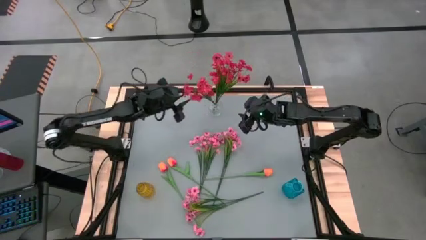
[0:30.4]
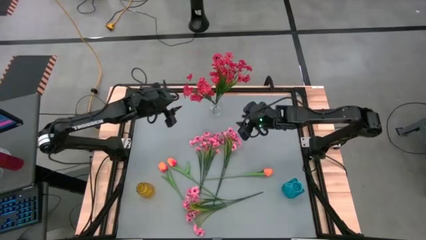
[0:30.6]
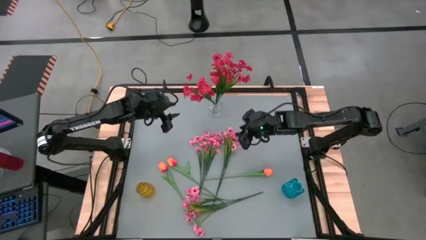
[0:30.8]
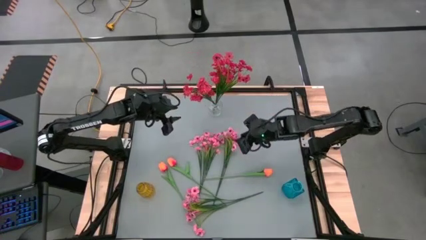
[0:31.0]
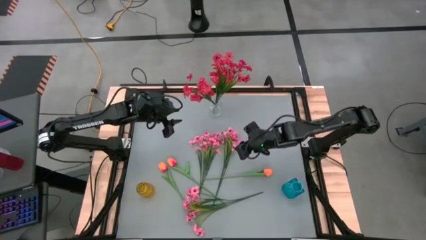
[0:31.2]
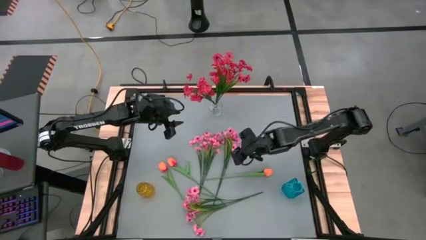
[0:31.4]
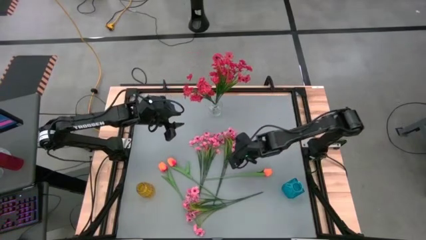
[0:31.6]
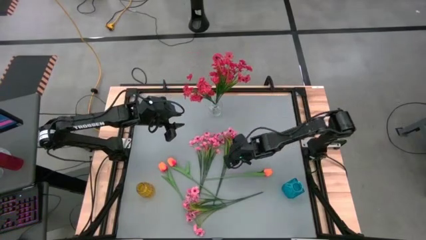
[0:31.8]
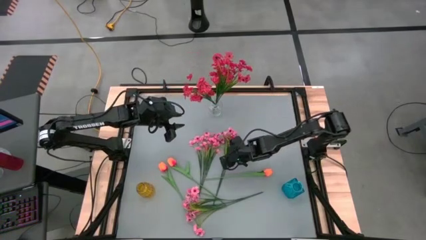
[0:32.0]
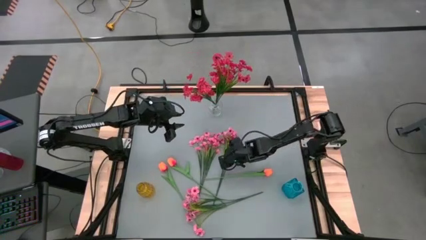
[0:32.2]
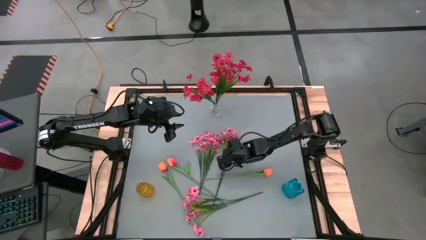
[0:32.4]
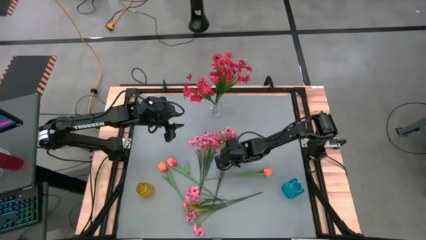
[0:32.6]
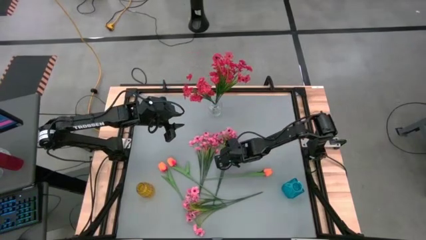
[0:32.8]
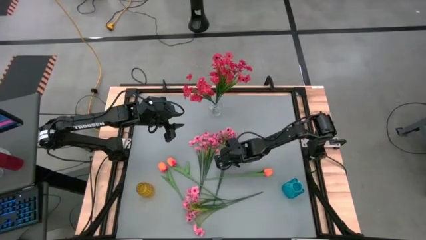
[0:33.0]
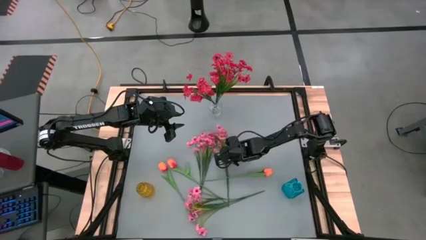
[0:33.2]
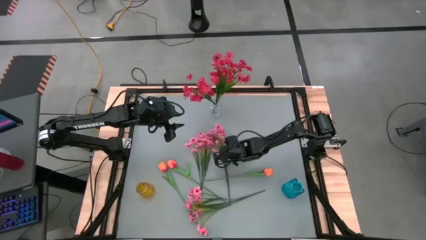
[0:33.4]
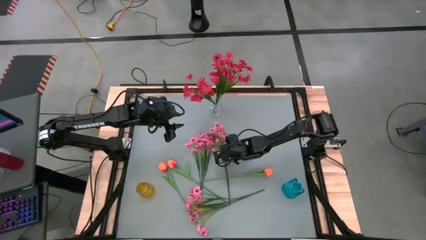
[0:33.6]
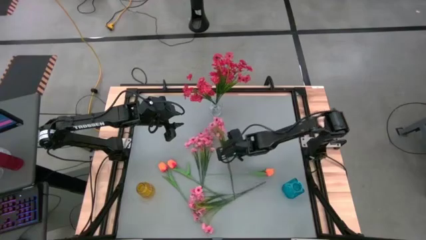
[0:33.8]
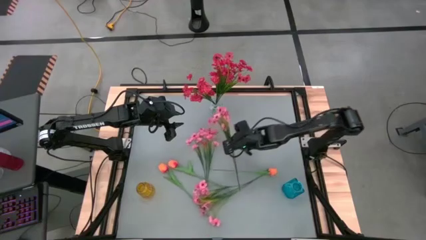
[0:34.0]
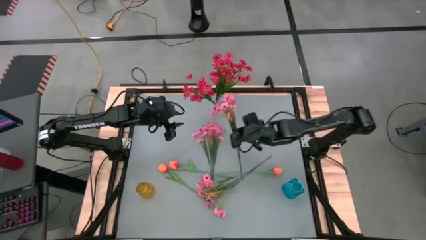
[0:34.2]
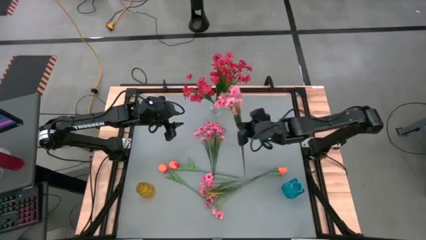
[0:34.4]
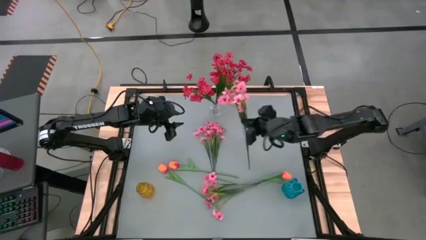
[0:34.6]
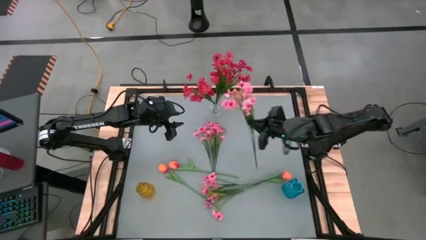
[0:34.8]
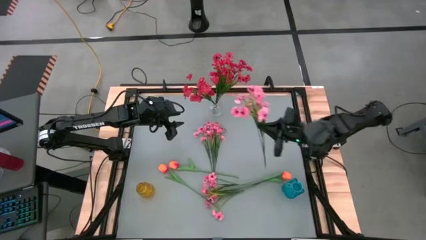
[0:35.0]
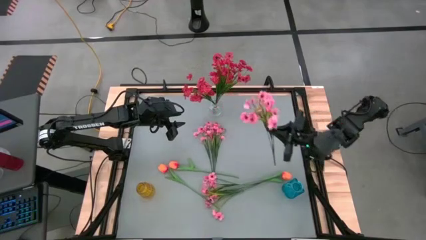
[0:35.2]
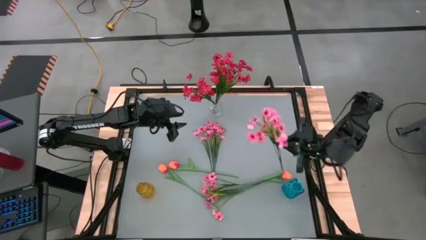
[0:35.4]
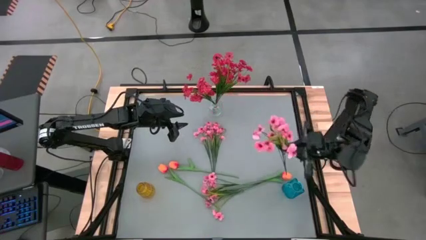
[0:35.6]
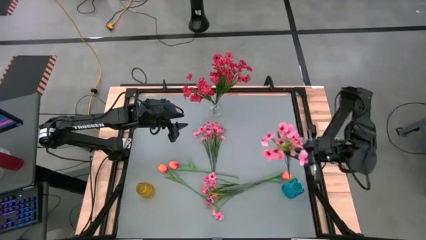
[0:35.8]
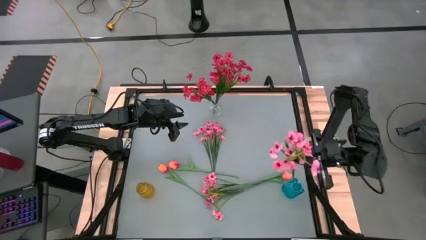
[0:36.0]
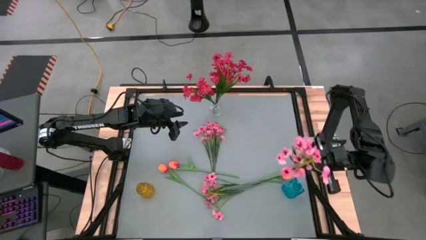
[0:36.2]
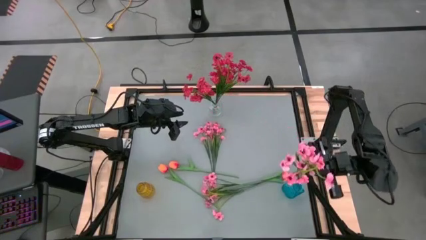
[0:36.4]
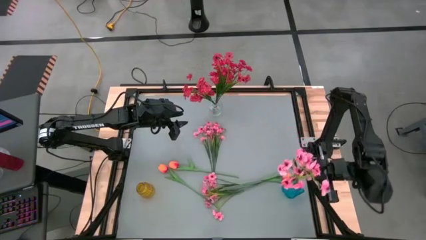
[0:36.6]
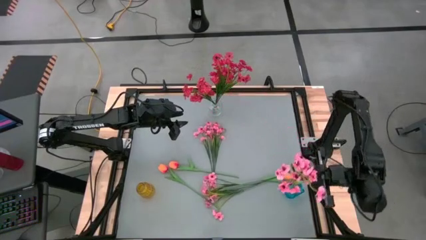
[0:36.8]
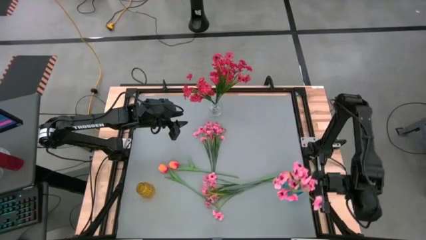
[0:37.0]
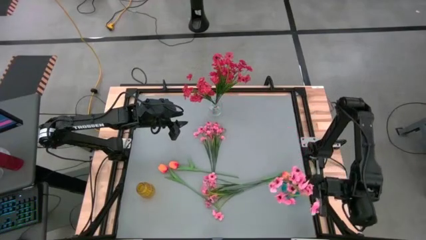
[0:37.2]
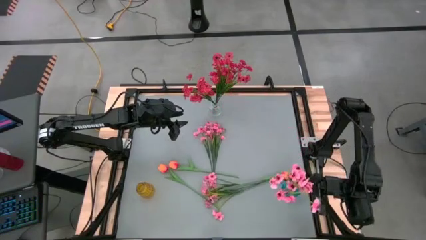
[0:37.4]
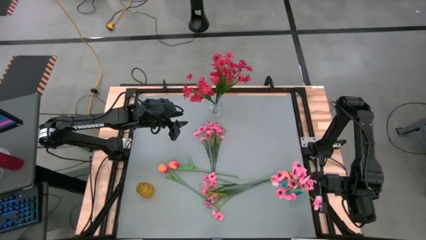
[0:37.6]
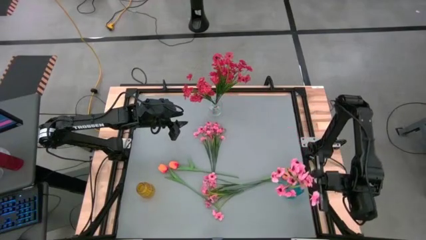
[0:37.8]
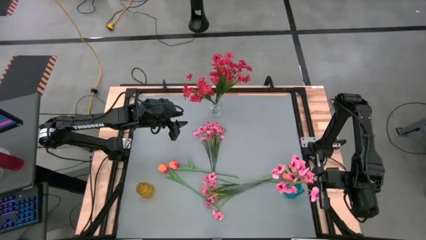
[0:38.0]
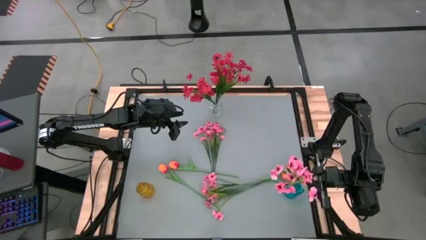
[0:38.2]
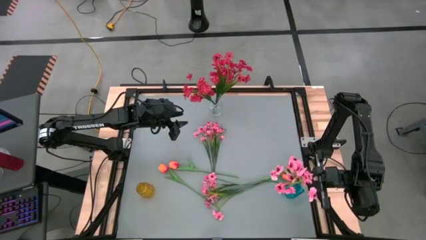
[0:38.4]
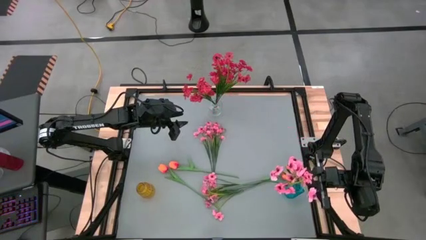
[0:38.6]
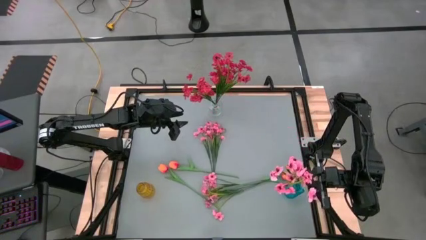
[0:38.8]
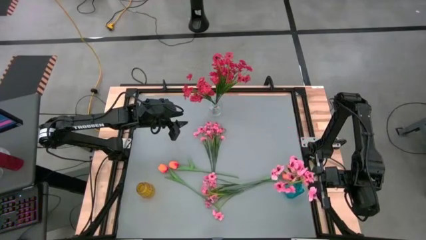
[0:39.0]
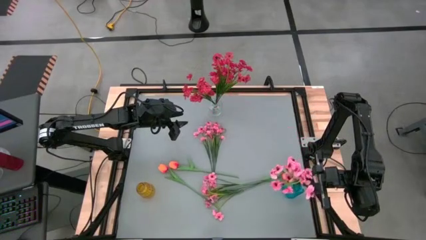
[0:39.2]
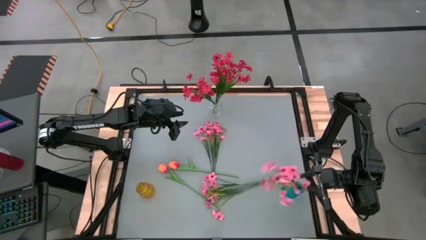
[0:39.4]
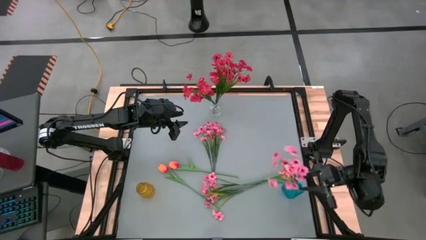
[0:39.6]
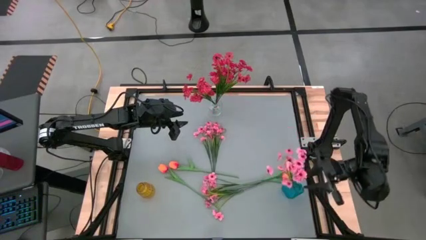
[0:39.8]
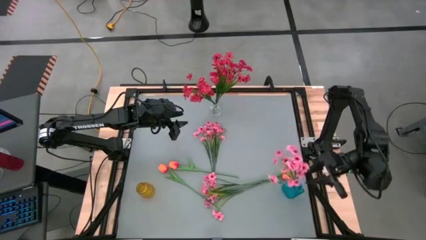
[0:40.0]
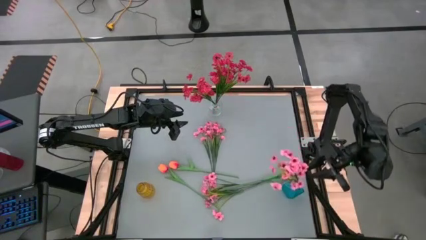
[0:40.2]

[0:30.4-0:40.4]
Task: Sort flowers into vase by color
Put the top right pink flowers into the blue vase

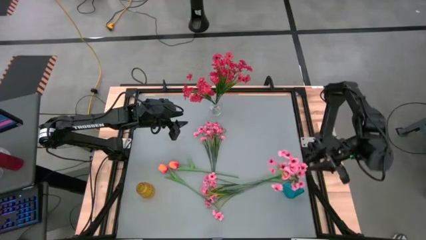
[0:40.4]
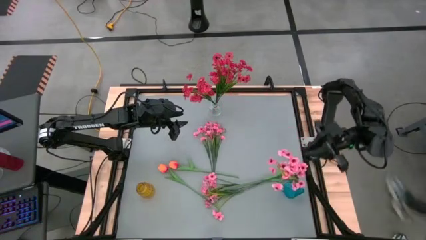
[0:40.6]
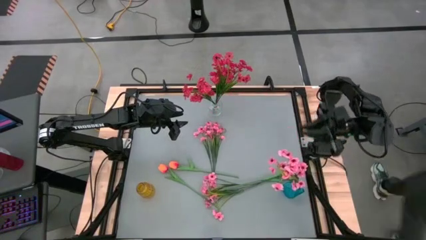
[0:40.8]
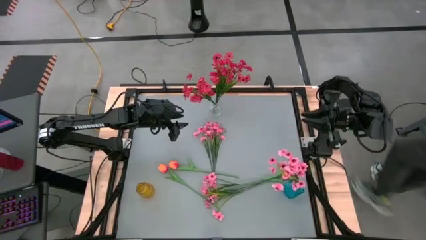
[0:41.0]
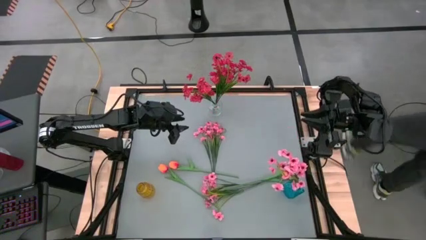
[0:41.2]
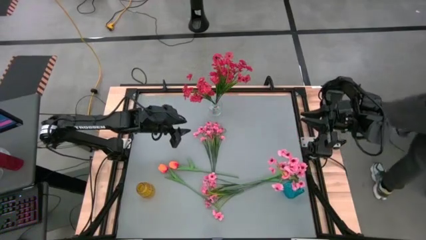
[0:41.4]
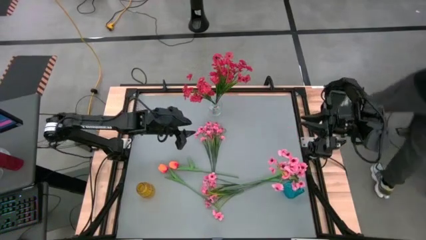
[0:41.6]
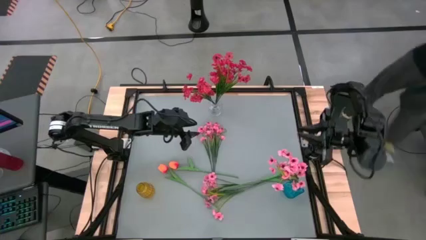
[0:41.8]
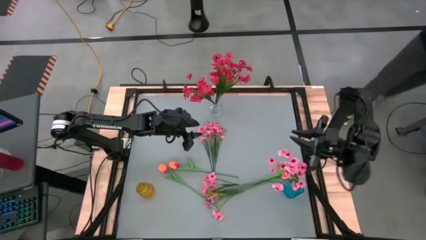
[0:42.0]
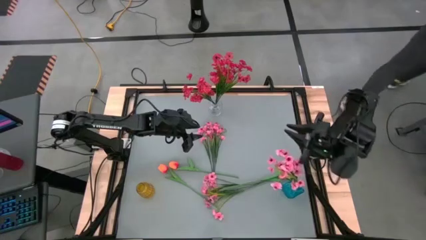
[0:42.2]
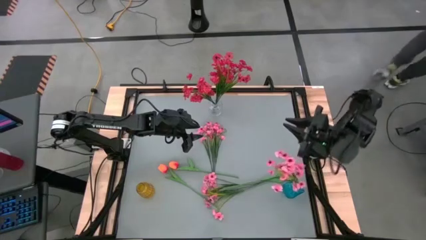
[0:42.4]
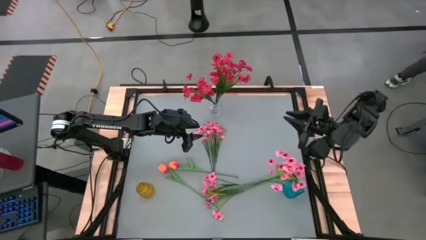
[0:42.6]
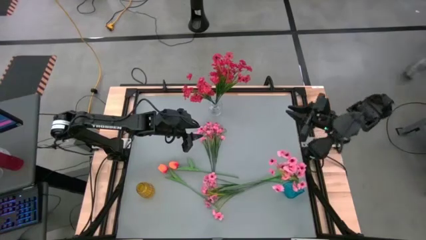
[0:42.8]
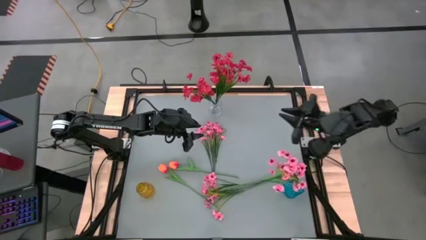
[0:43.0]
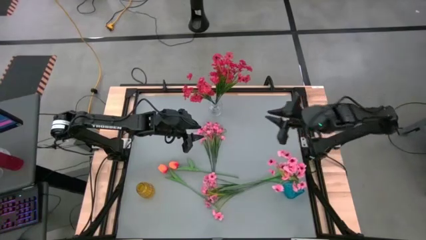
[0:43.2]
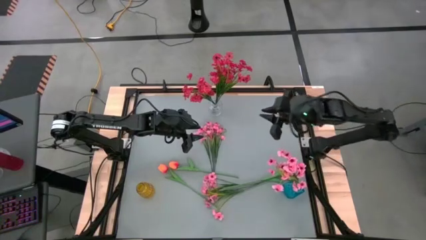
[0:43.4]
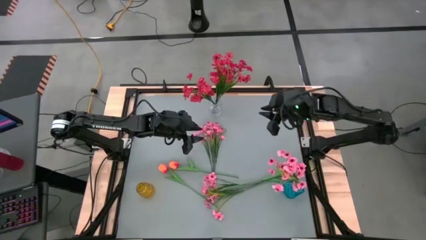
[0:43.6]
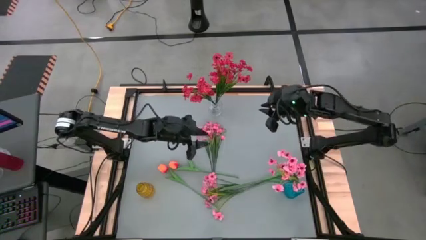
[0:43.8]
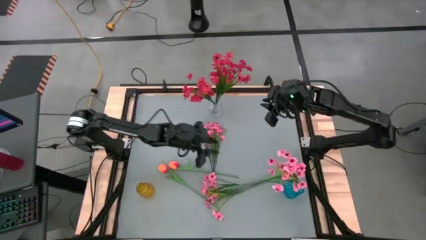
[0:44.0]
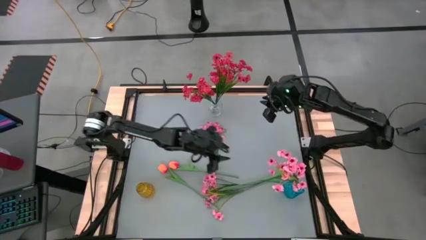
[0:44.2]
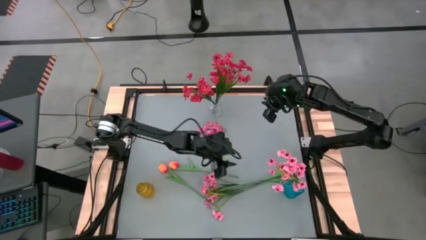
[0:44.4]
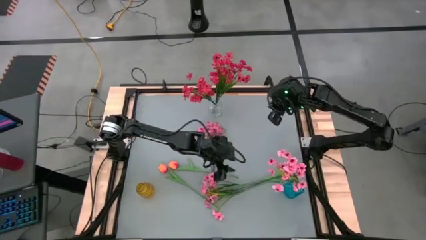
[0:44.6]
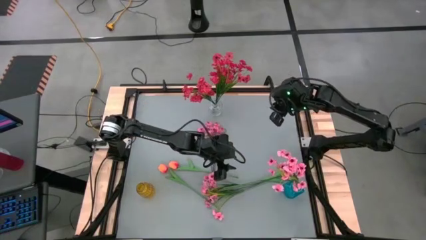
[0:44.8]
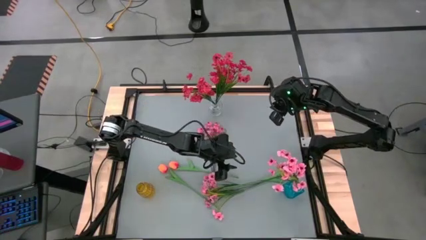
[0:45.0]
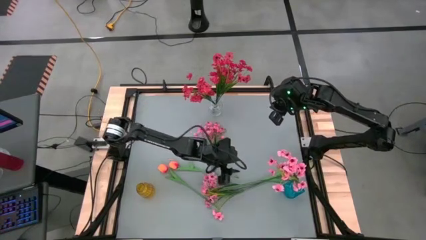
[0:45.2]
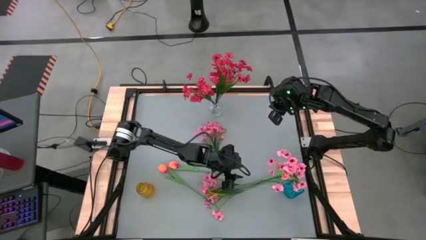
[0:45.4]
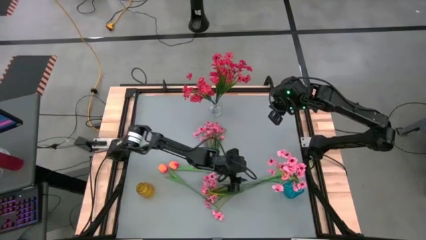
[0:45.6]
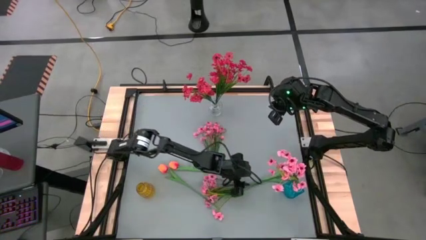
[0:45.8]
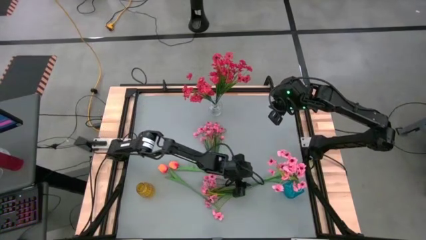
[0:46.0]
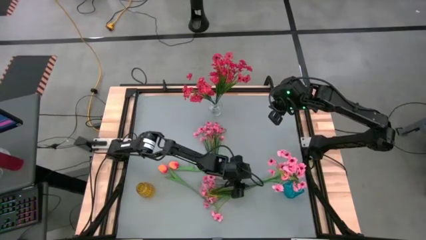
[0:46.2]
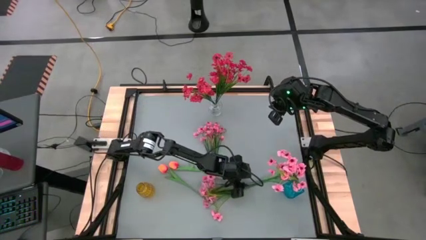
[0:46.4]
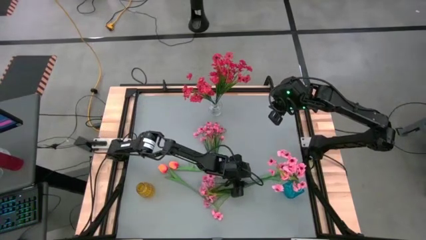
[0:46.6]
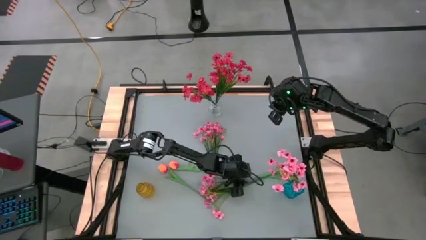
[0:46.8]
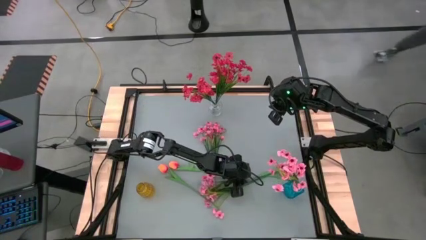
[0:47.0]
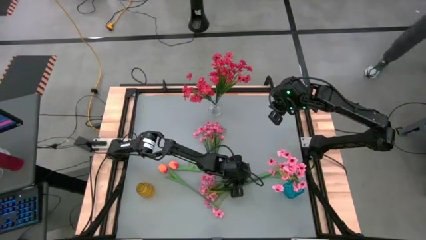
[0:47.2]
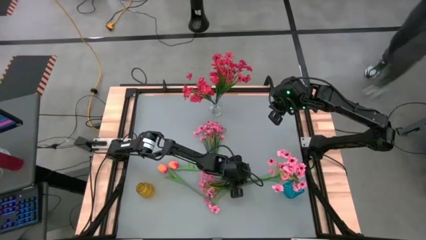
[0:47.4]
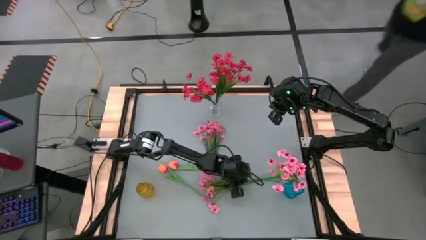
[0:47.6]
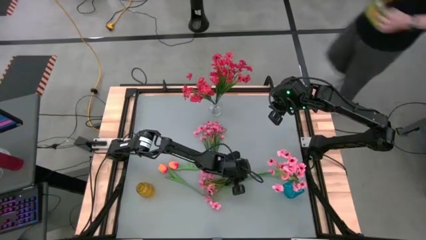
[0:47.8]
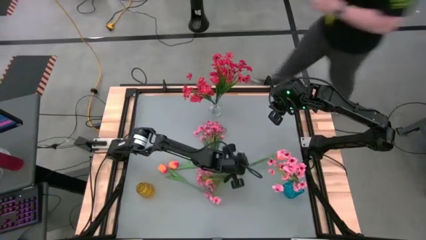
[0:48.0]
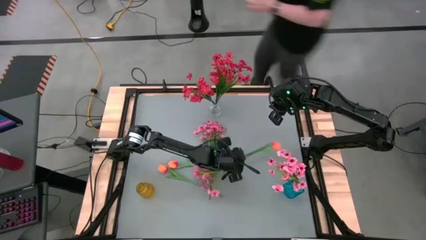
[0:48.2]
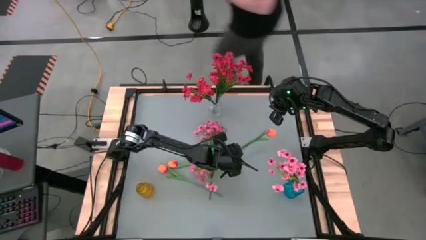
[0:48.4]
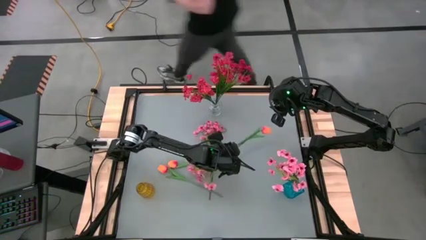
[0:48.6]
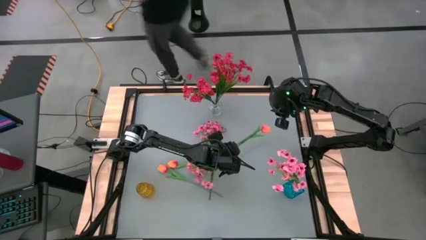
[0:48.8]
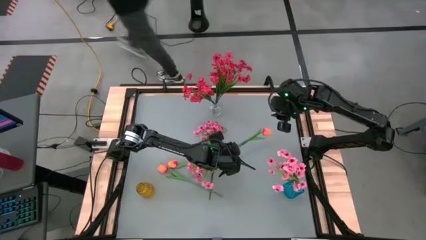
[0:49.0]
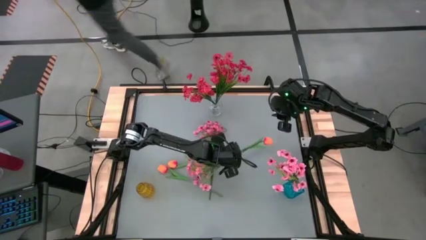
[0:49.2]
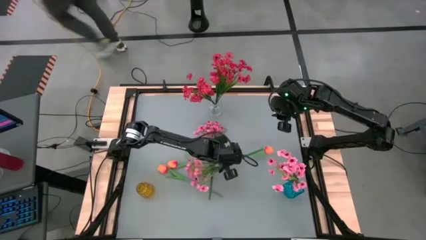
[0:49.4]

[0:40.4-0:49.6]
Put the right orange tulip flower into the yellow vase
